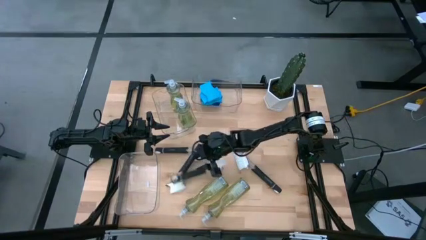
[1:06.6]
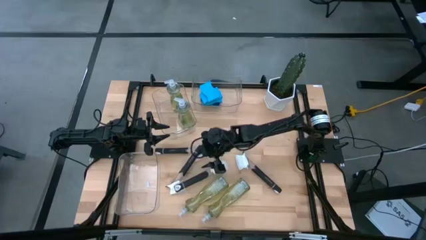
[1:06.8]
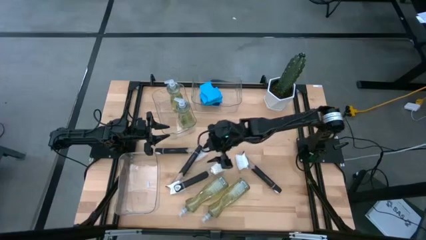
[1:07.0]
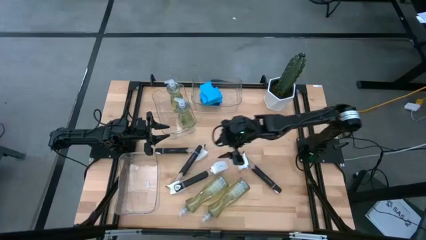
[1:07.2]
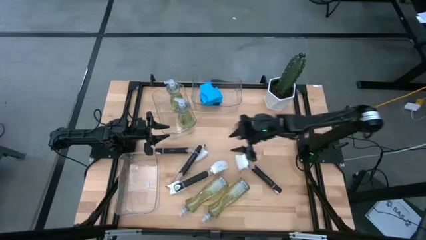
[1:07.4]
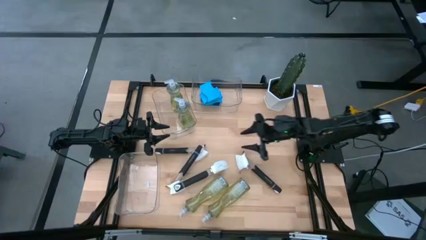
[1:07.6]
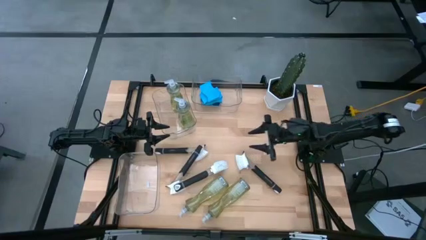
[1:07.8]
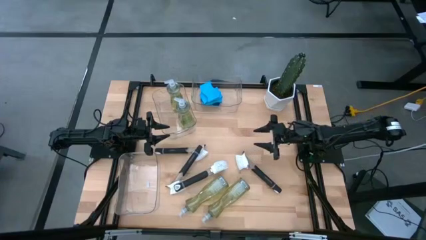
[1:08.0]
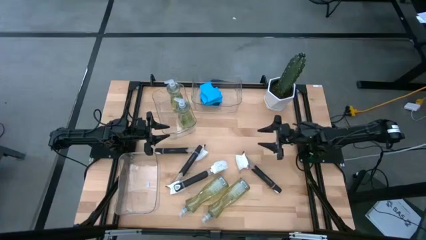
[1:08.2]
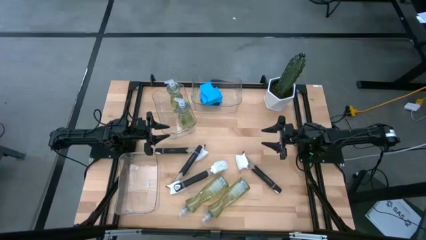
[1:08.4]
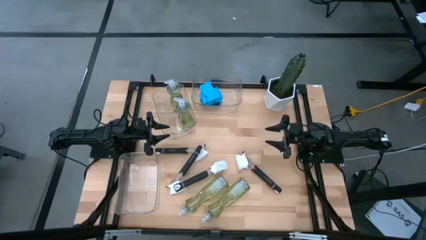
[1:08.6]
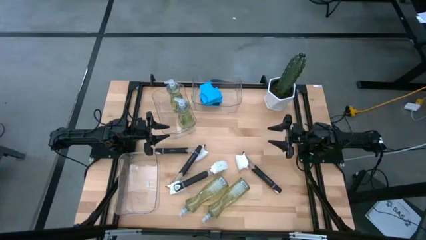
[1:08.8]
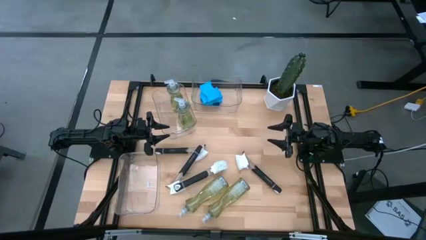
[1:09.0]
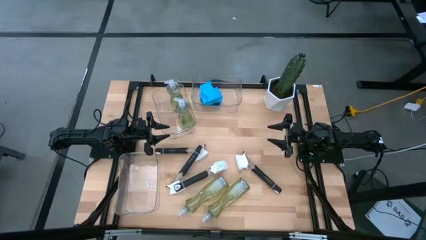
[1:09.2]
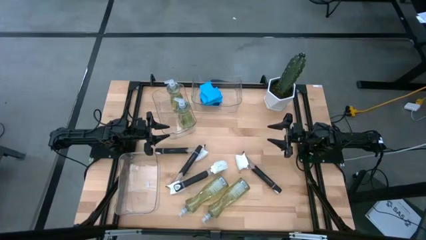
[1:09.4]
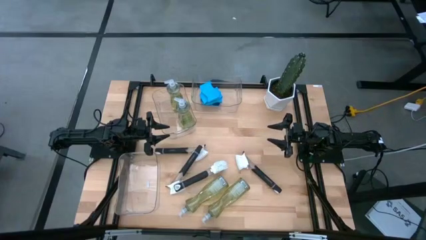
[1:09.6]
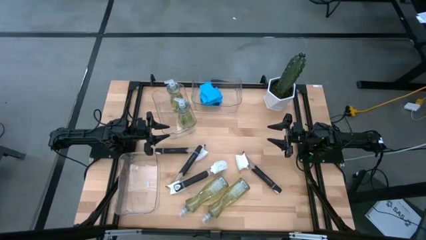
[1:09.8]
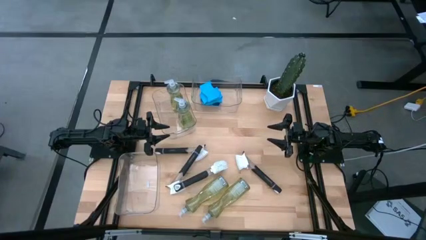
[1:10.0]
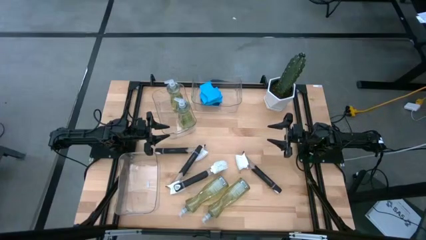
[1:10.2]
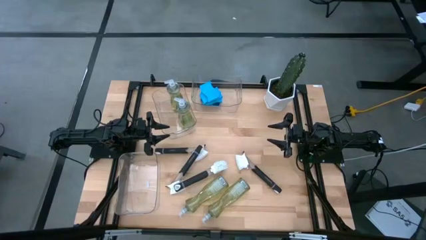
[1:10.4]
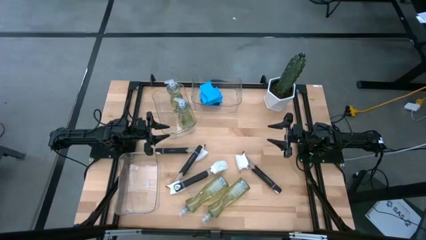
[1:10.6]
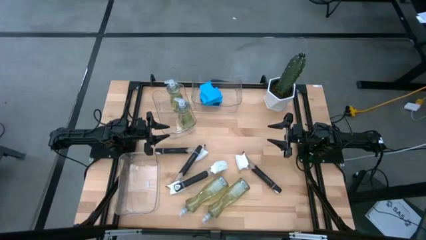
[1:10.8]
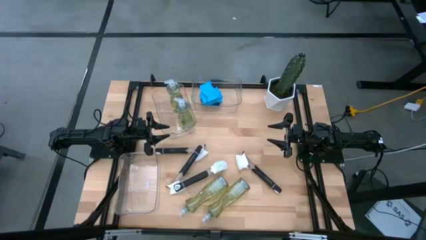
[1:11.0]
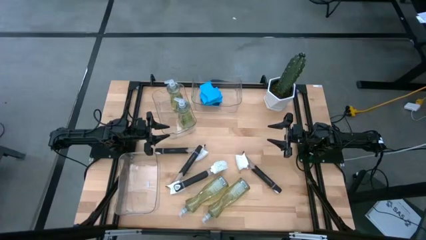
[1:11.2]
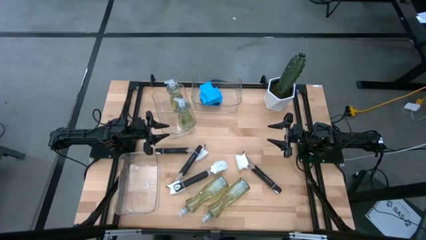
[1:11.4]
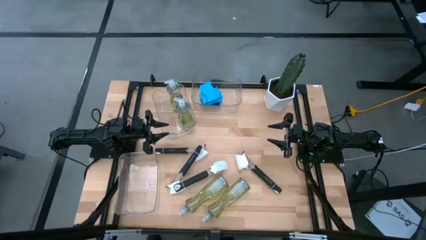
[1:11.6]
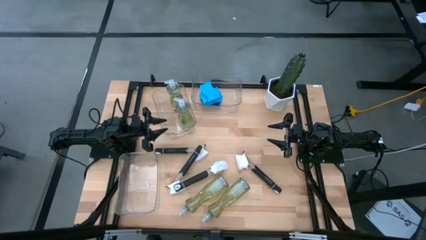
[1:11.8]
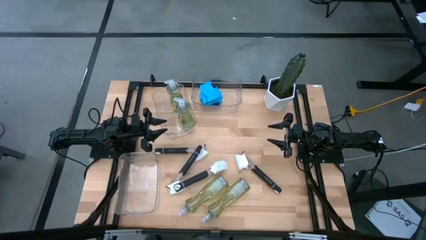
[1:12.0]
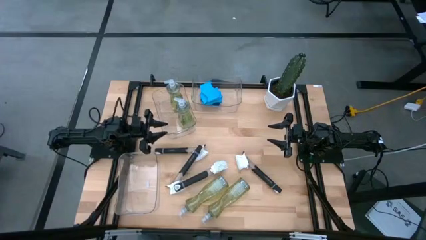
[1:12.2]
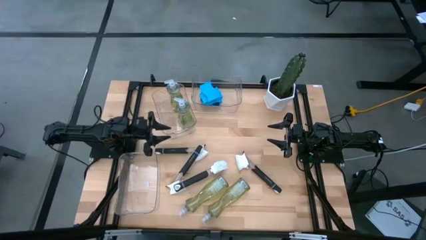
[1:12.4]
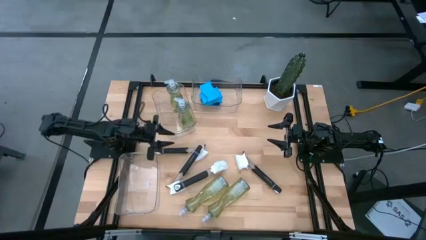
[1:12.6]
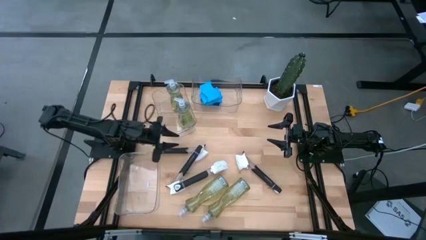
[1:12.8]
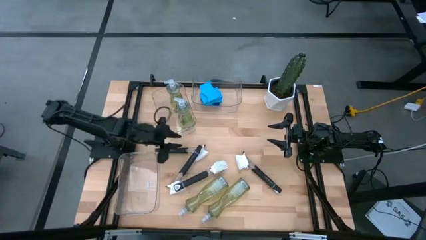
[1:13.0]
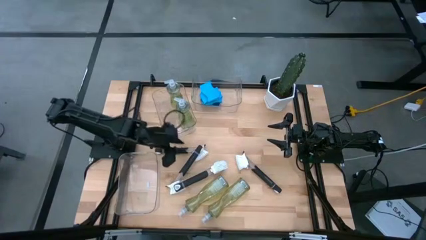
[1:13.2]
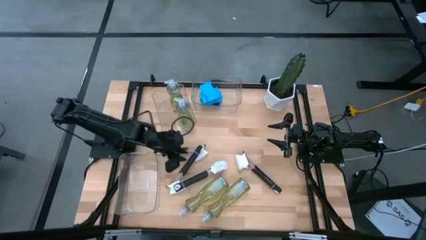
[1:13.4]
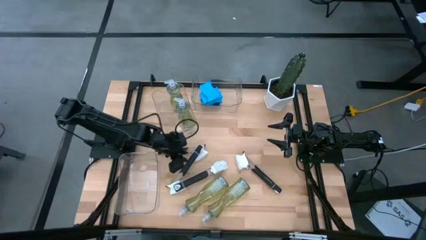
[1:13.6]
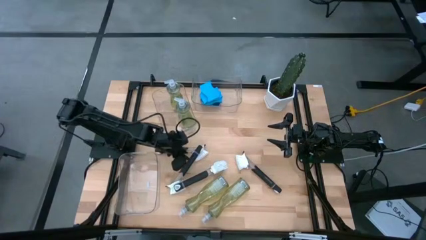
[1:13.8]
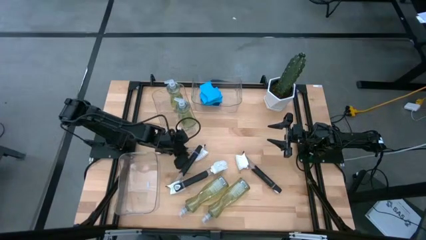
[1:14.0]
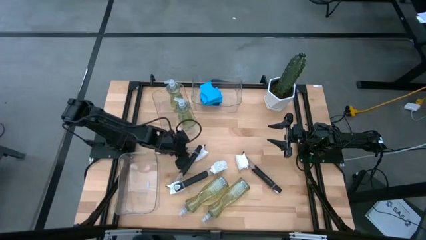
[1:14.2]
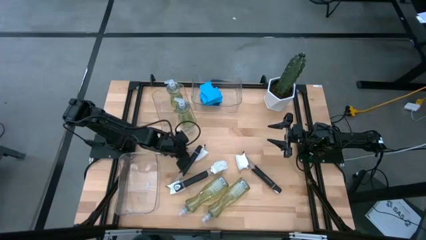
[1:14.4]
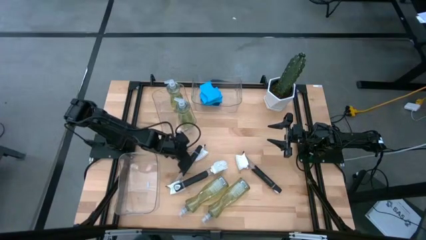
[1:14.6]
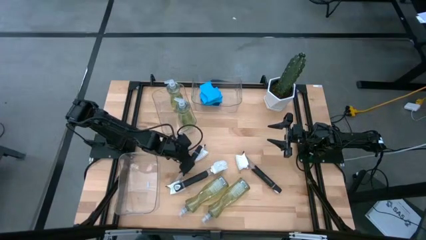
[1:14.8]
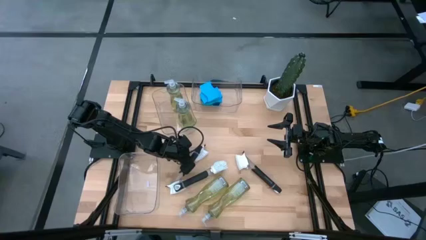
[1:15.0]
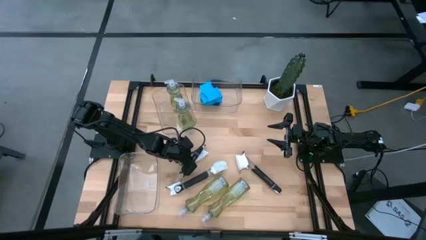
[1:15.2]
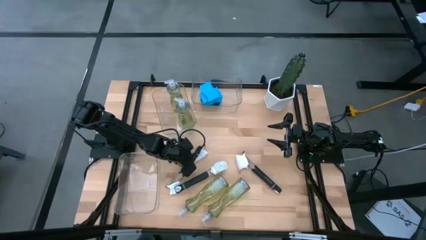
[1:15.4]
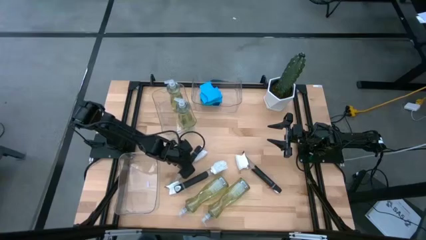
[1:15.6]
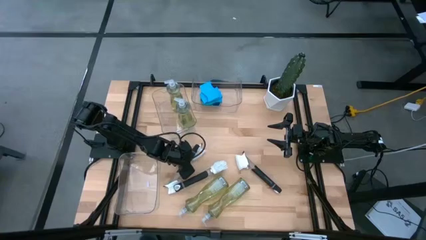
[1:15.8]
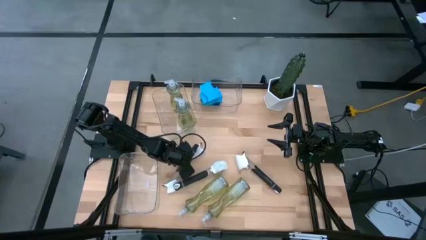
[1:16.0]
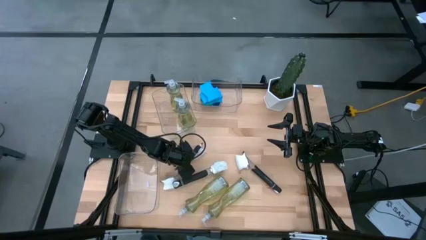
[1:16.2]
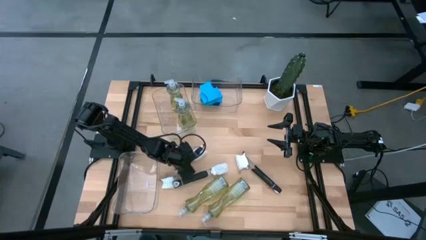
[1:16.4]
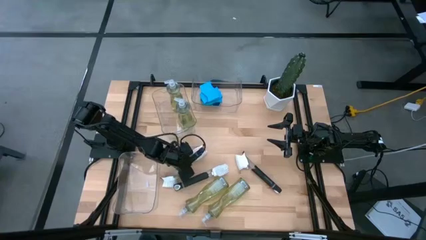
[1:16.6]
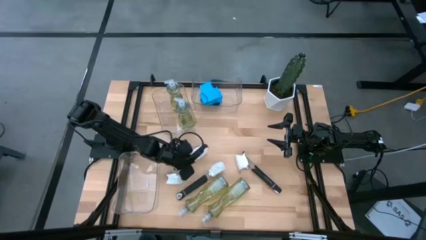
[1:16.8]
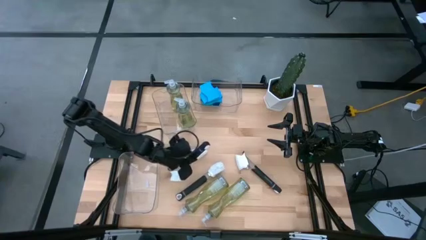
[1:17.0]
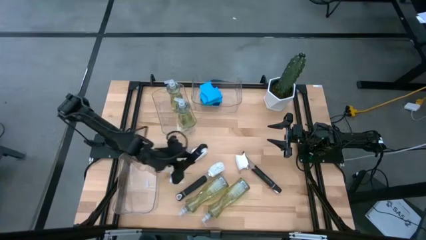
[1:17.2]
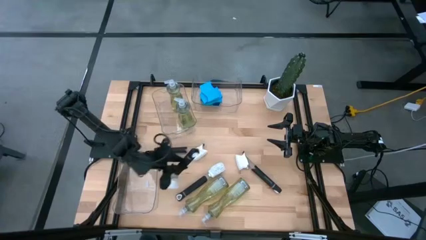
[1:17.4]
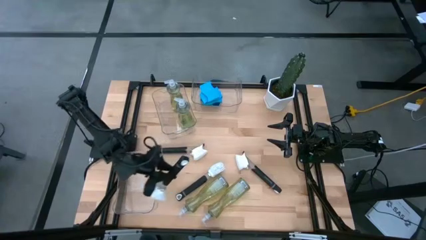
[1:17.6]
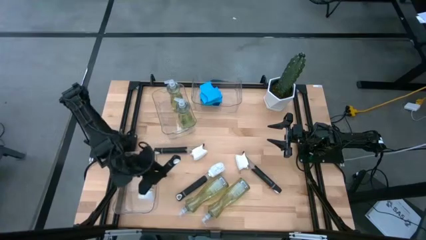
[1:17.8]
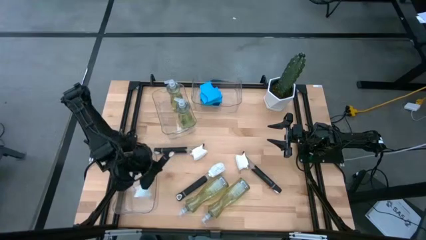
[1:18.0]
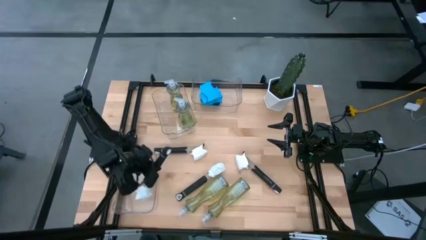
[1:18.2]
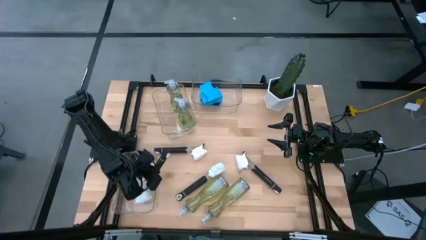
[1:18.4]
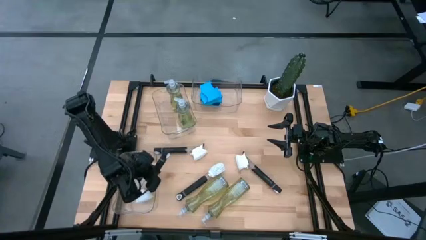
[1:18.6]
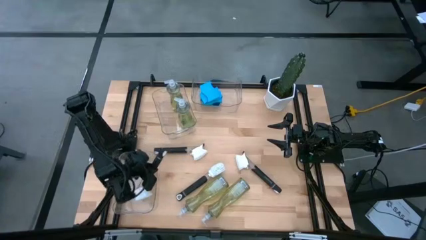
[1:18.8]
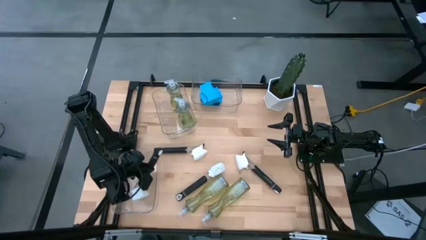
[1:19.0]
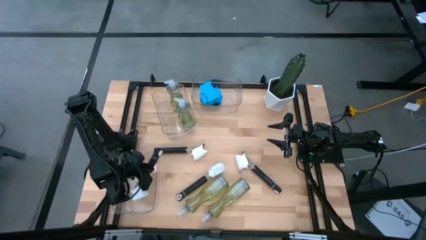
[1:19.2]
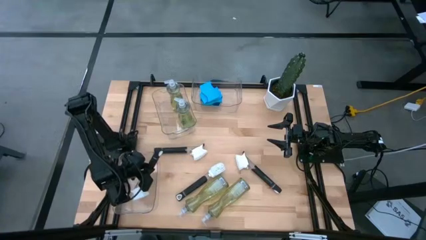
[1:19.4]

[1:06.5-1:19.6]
Task: Pick & Place Kitchen Sink Supplies
Put the dish brush into the bottom transparent bin

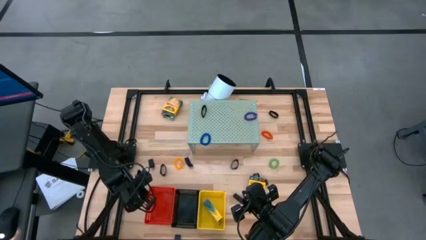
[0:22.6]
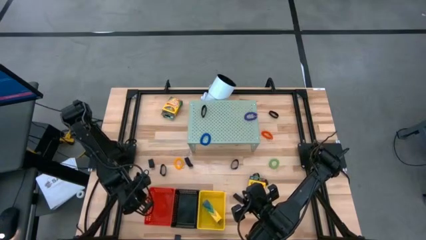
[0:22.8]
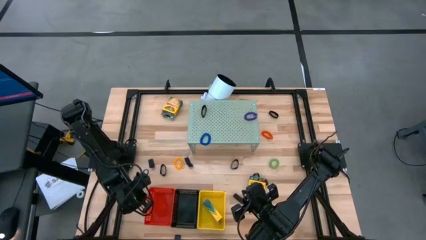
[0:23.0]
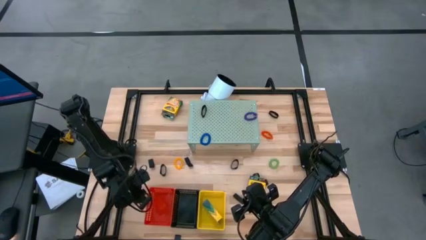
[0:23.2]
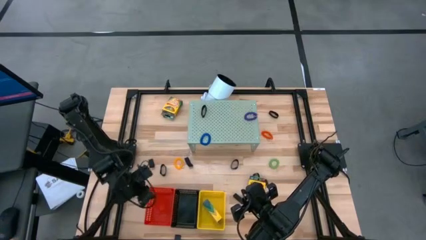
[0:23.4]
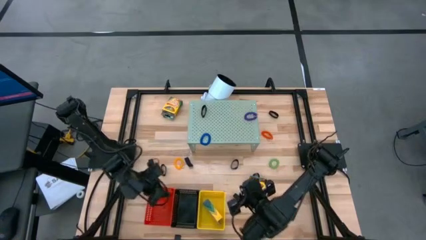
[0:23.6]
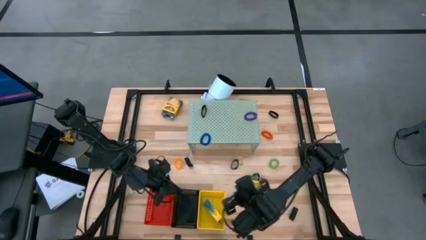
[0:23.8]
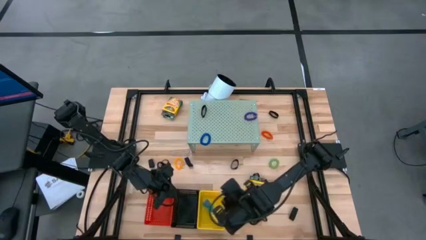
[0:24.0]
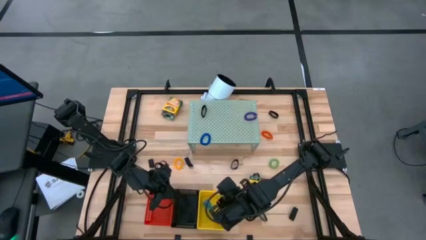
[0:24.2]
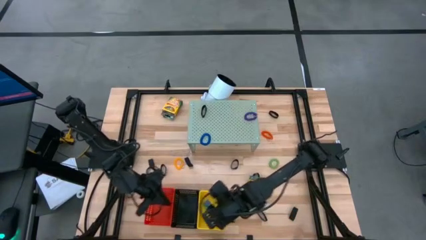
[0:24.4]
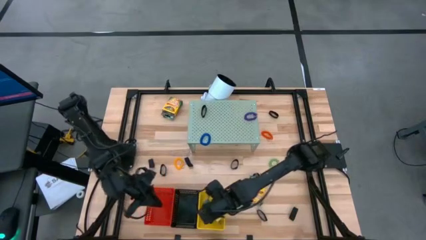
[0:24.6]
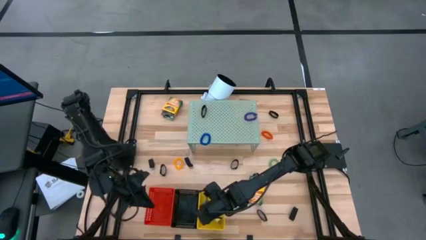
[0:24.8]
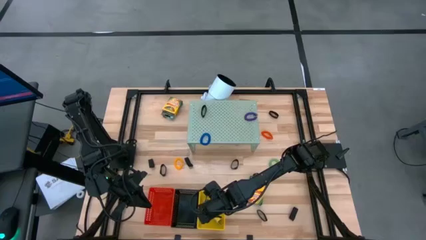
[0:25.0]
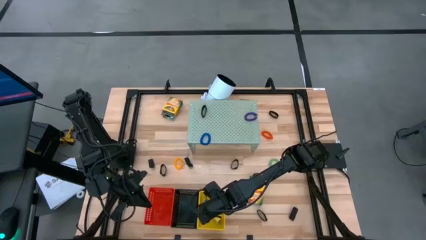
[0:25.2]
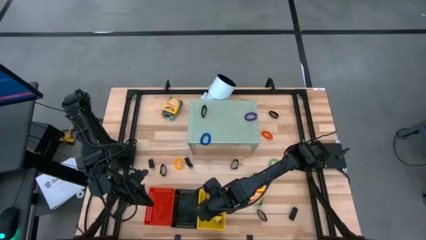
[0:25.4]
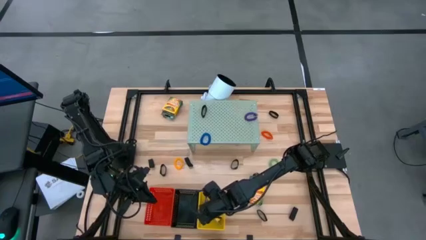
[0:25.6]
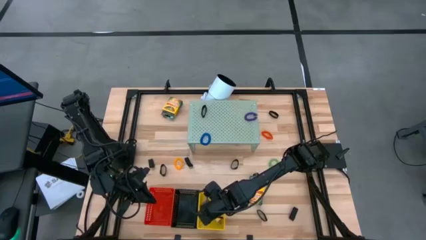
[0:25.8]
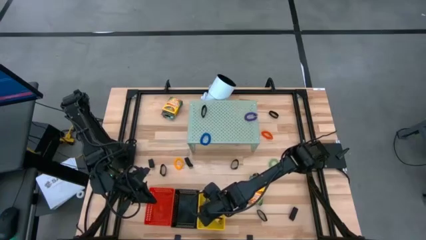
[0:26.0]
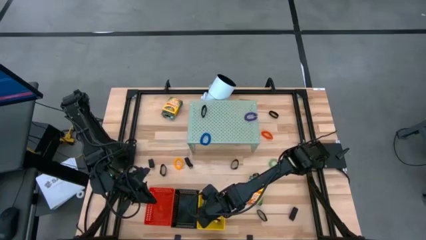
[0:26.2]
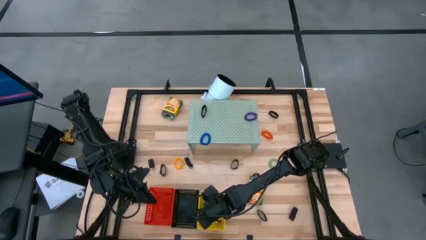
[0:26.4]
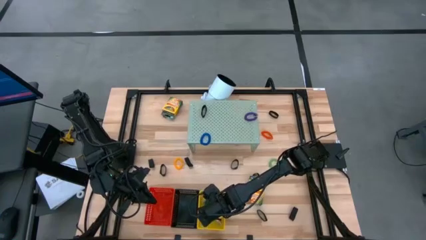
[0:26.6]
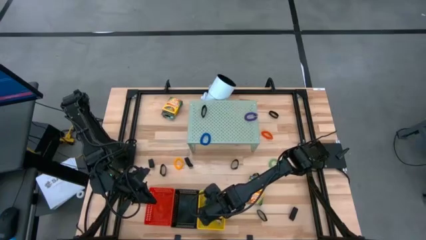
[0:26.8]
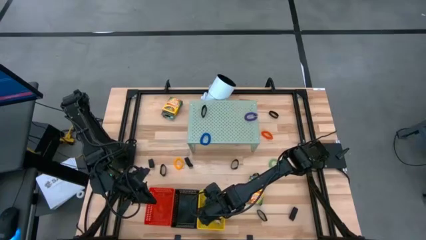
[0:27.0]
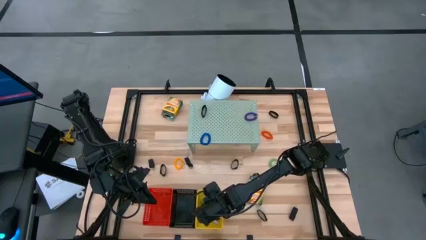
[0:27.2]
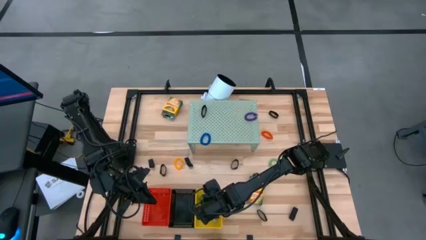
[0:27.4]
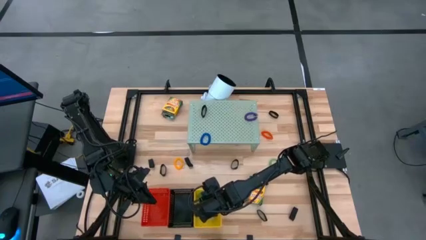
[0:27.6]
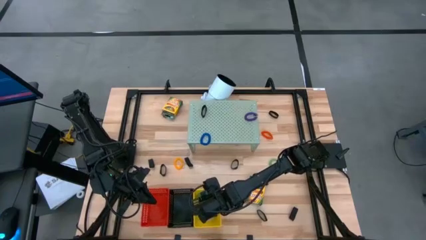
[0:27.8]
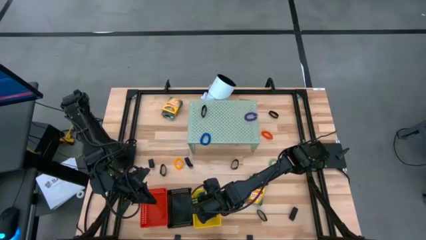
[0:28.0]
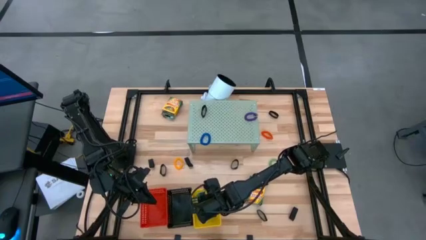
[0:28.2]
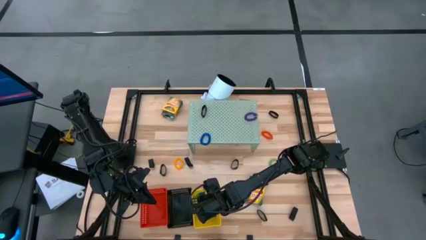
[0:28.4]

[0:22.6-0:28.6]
Task: Pick & Place Office Desk Supplies
Adjust the yellow crayon box in the yellow bin
